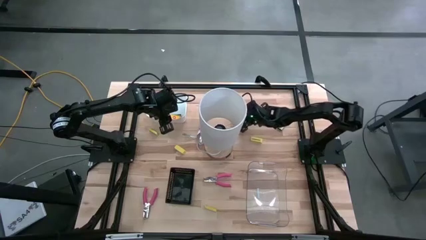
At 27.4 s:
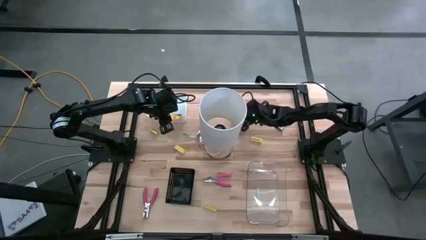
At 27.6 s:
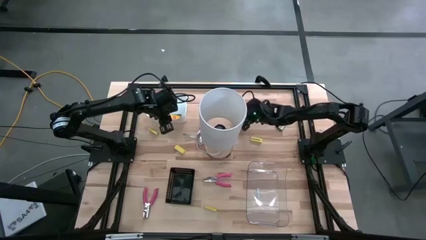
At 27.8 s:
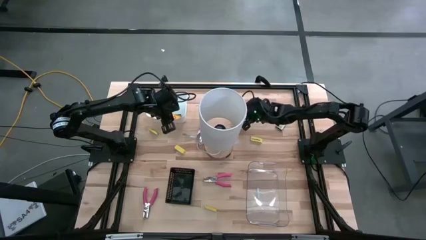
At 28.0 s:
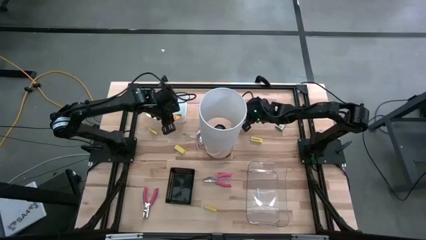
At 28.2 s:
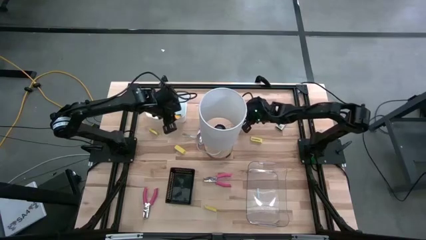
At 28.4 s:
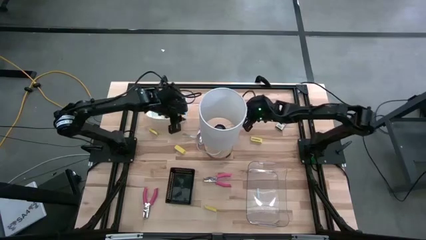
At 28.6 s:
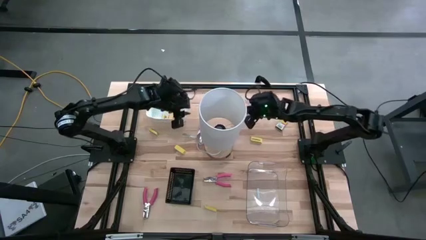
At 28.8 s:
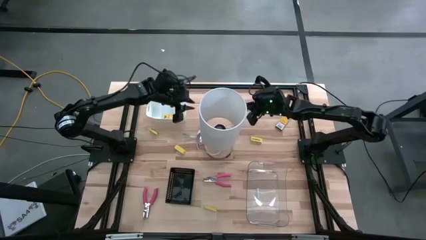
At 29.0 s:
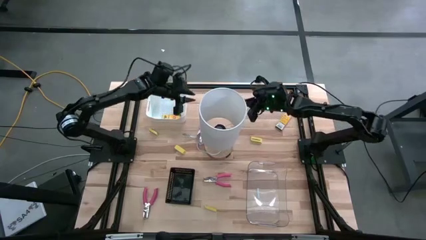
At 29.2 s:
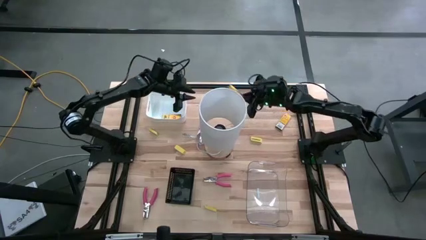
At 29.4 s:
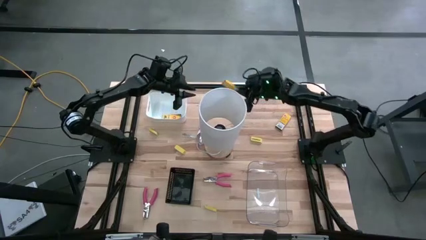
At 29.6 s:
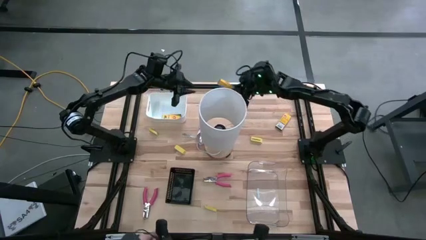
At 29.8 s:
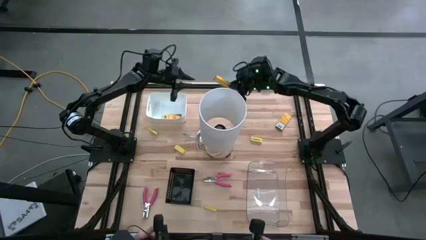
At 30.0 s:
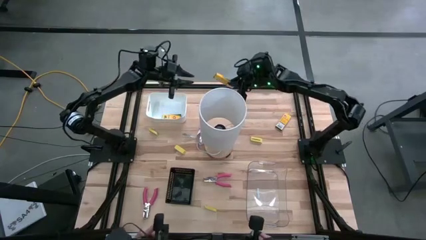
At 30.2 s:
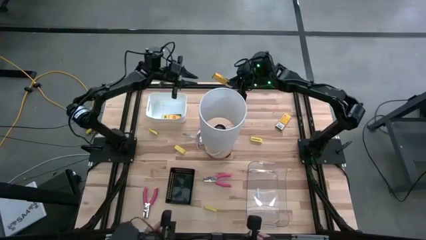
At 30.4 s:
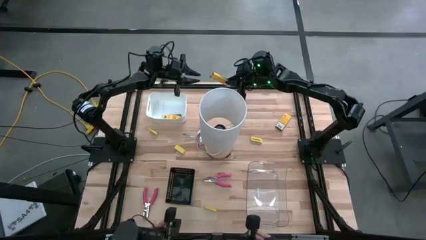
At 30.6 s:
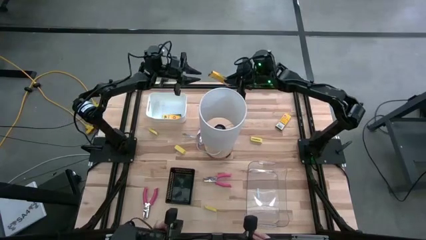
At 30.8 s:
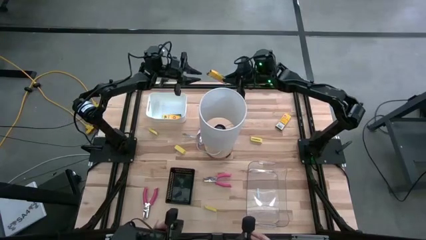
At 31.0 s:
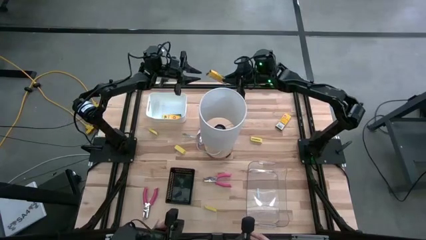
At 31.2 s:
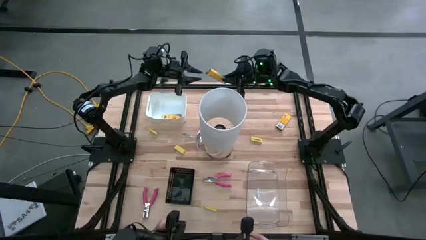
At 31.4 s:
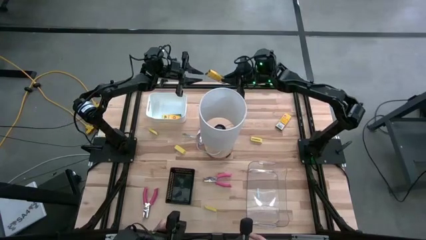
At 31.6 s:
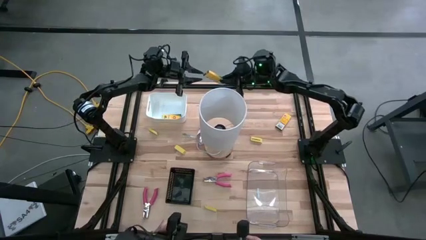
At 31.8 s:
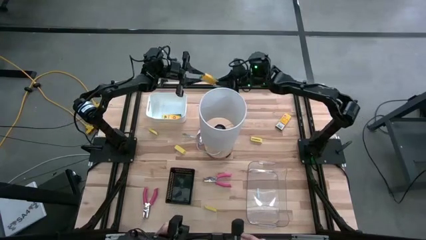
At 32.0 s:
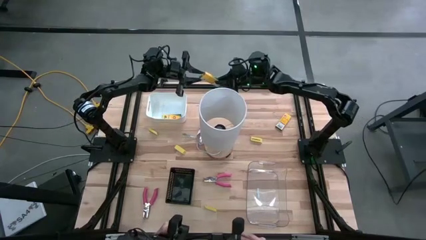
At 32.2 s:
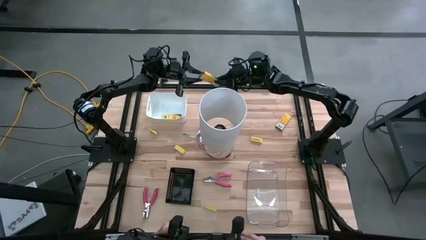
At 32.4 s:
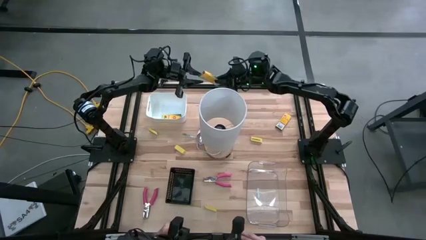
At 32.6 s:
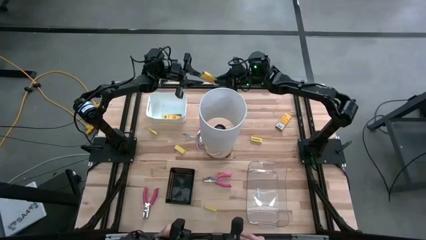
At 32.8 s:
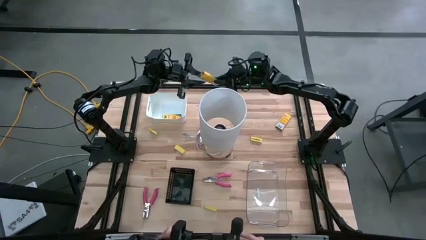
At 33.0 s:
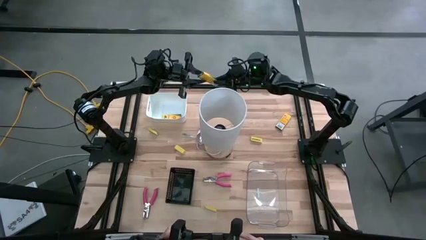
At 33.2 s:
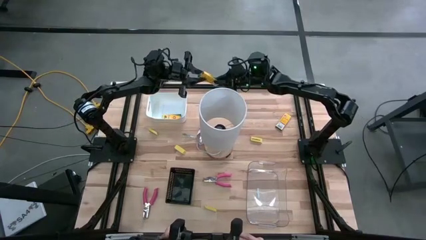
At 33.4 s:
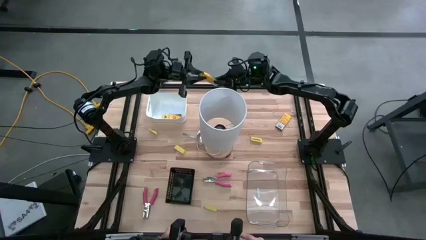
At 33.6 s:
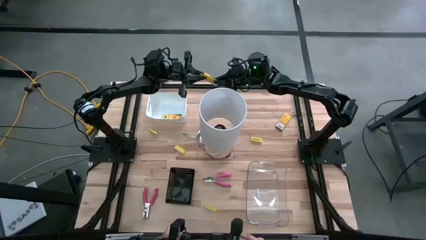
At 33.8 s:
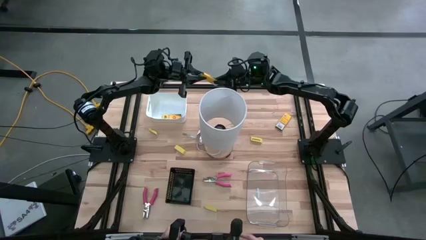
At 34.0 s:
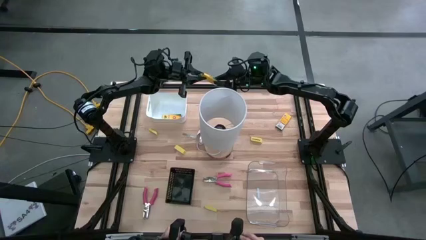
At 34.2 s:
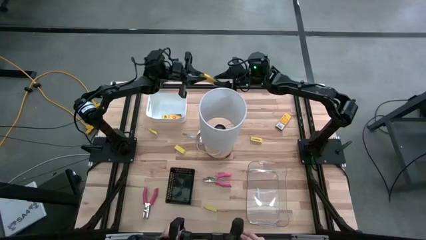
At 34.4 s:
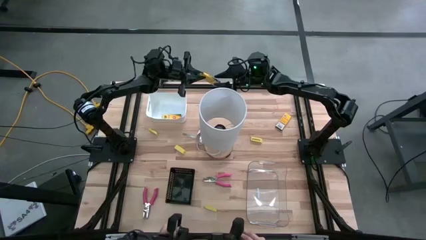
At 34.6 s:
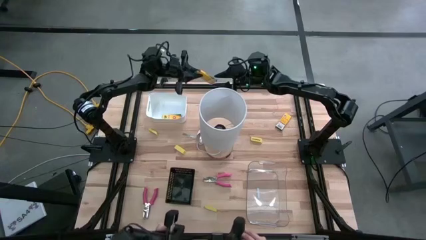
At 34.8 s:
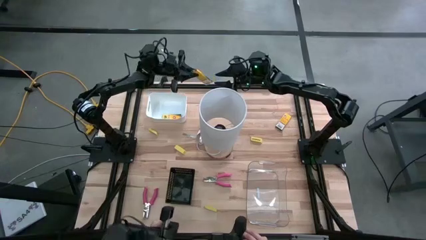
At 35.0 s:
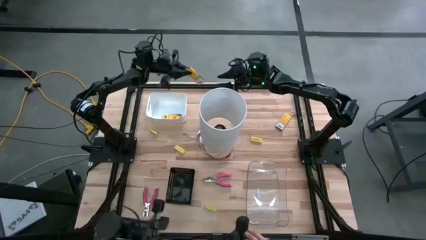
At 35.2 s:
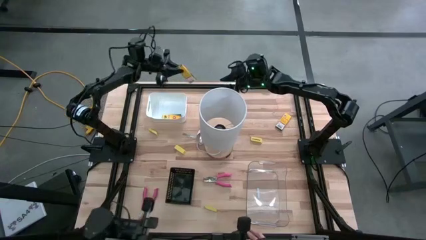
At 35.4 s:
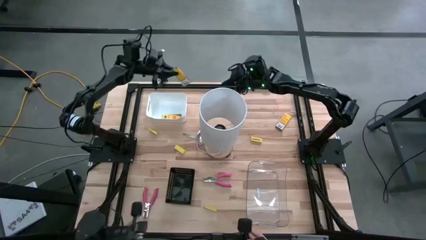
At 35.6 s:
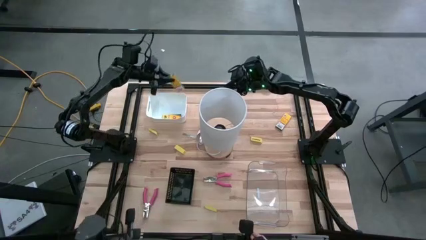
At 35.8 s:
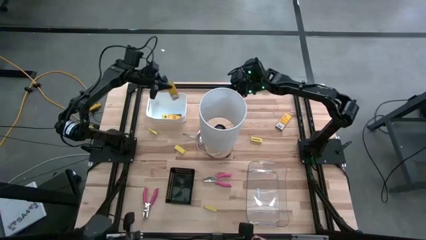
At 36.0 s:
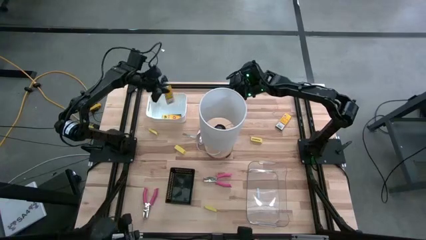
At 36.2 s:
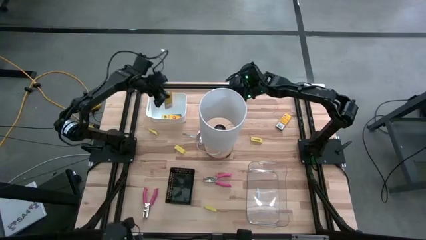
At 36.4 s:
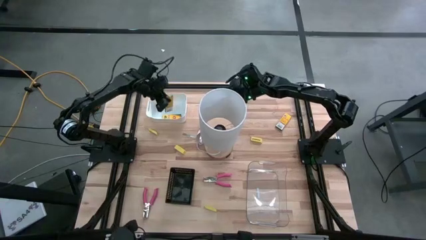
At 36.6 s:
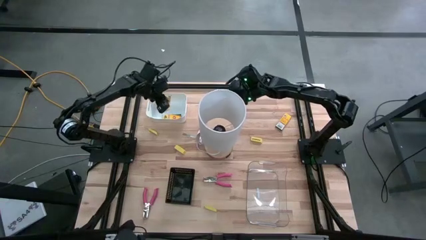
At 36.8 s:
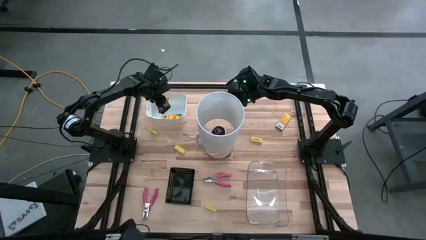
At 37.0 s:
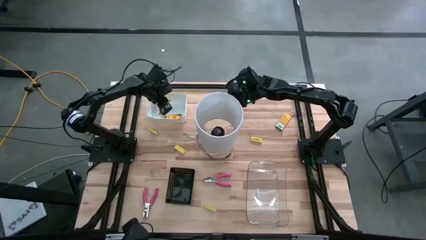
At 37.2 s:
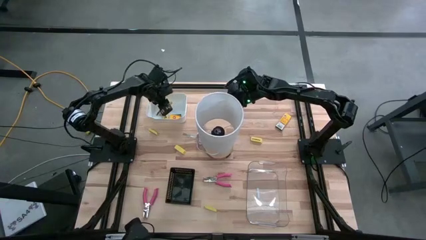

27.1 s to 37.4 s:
Task: Pick & Place School Supplies
Put the crayon box into the white bin

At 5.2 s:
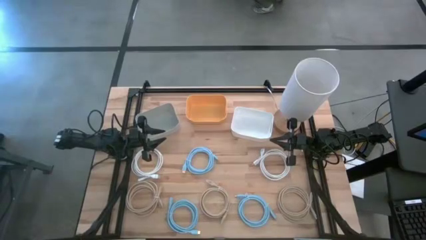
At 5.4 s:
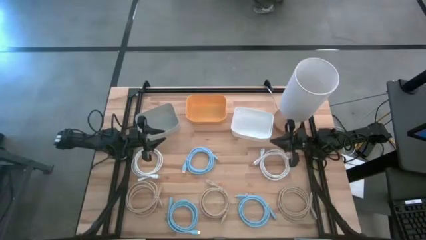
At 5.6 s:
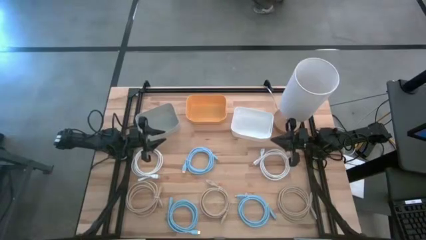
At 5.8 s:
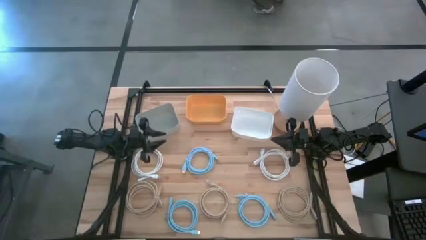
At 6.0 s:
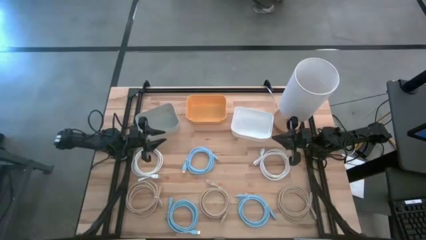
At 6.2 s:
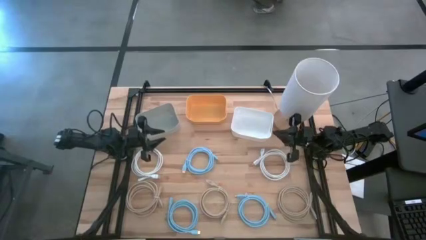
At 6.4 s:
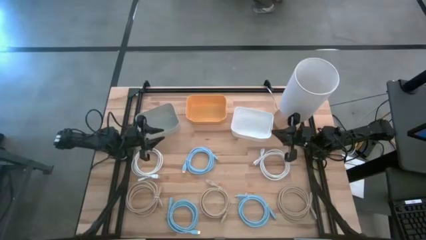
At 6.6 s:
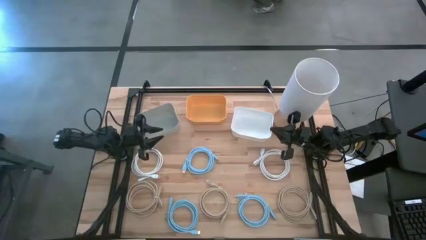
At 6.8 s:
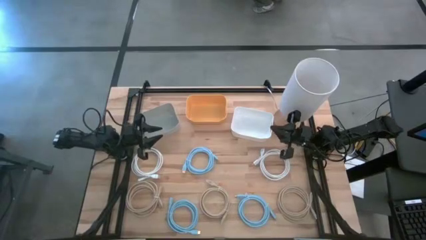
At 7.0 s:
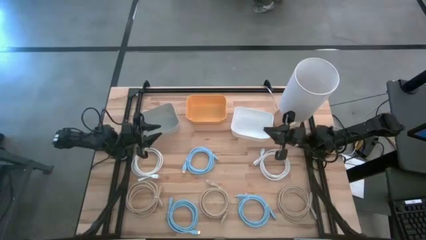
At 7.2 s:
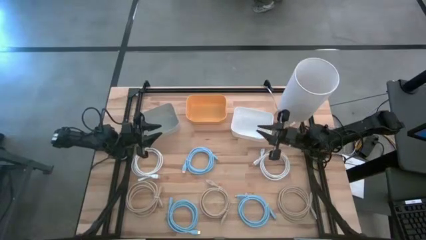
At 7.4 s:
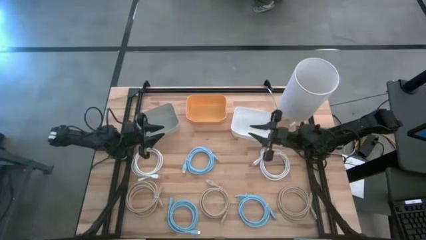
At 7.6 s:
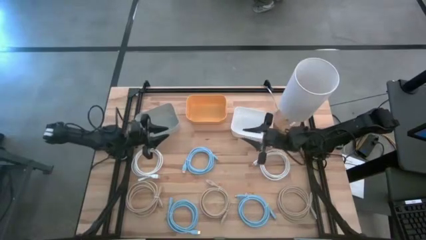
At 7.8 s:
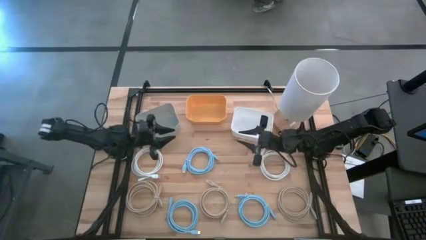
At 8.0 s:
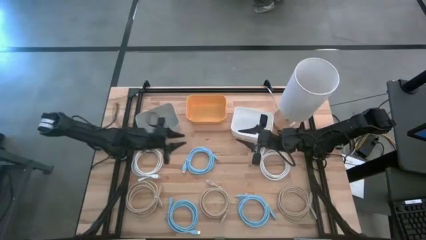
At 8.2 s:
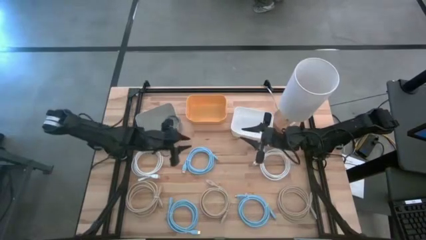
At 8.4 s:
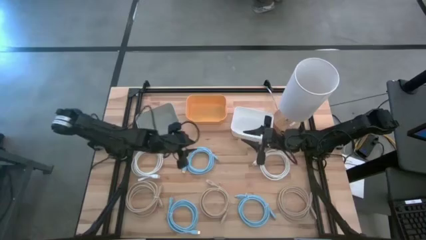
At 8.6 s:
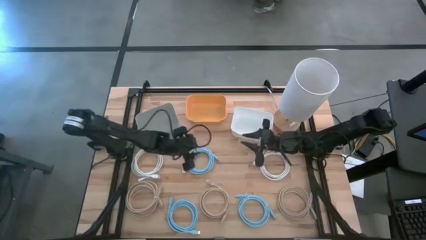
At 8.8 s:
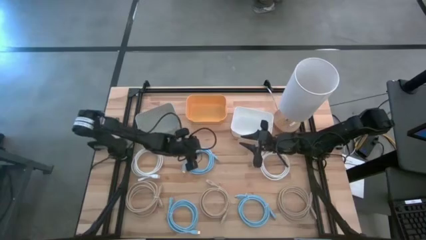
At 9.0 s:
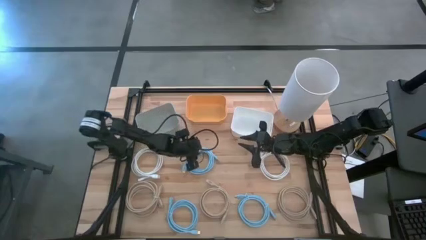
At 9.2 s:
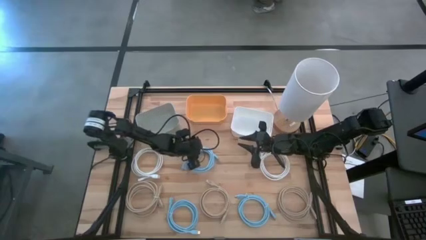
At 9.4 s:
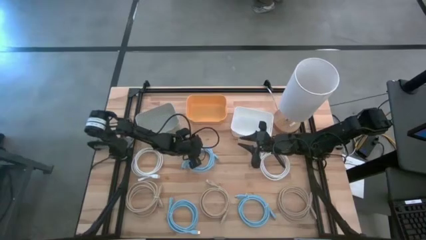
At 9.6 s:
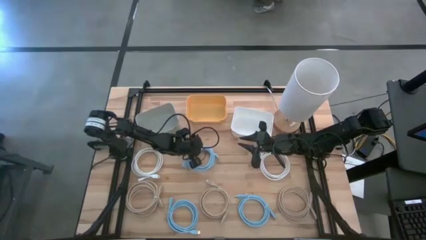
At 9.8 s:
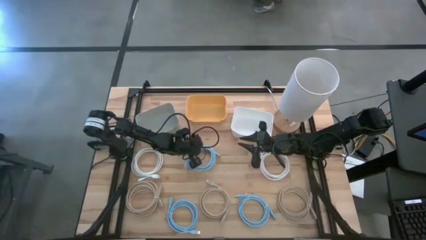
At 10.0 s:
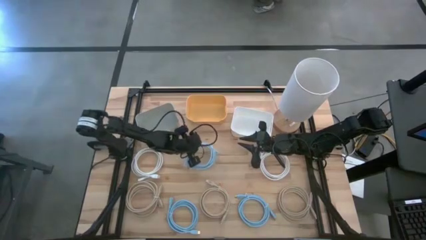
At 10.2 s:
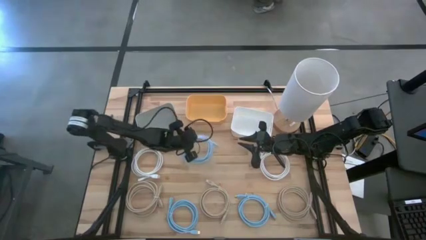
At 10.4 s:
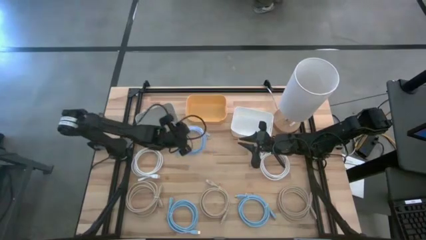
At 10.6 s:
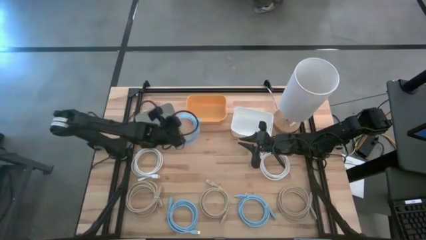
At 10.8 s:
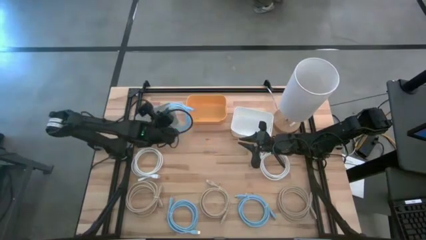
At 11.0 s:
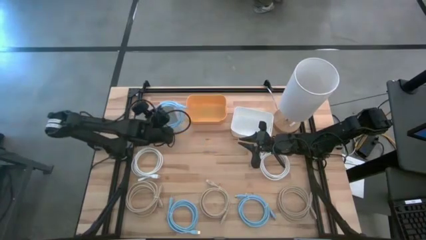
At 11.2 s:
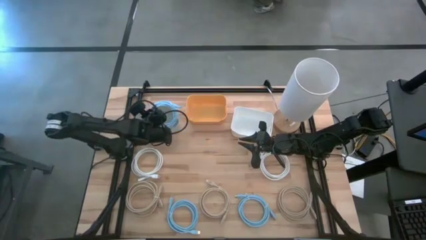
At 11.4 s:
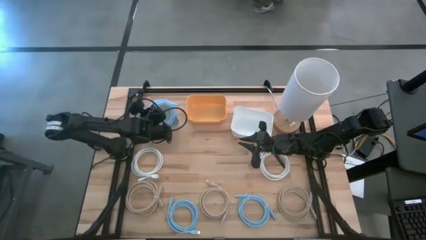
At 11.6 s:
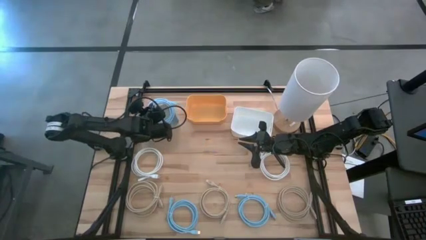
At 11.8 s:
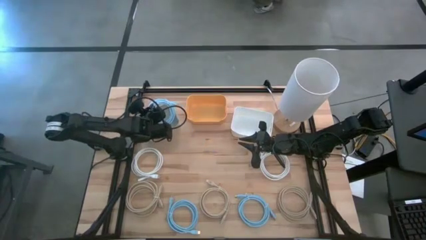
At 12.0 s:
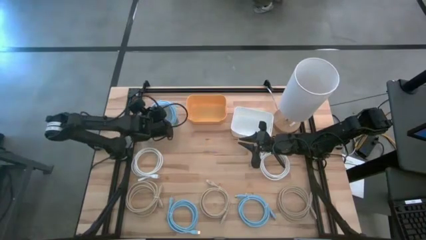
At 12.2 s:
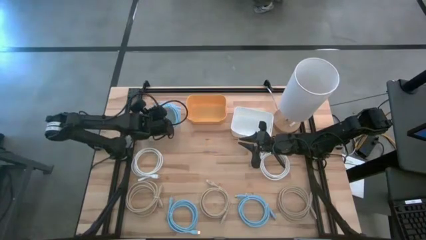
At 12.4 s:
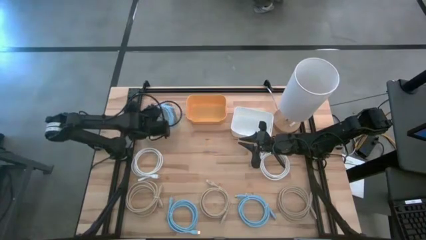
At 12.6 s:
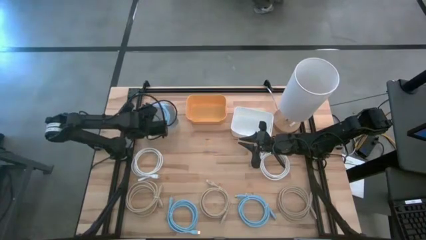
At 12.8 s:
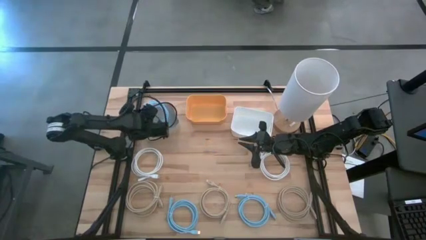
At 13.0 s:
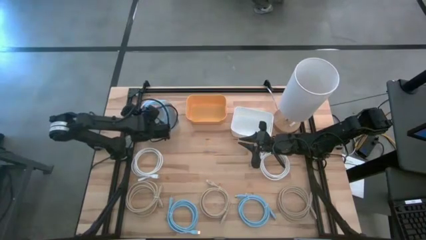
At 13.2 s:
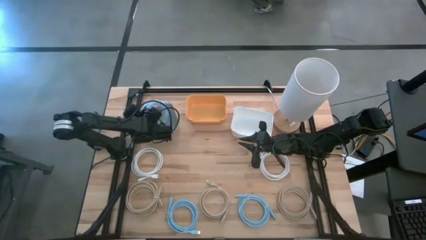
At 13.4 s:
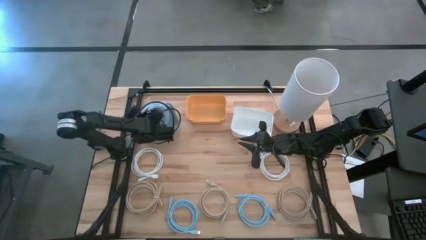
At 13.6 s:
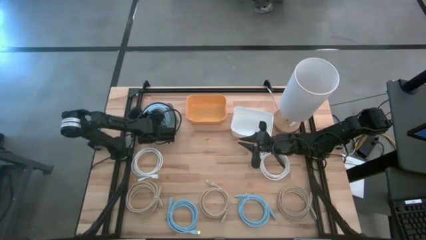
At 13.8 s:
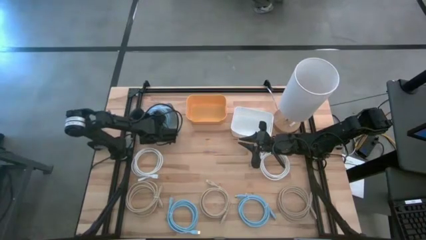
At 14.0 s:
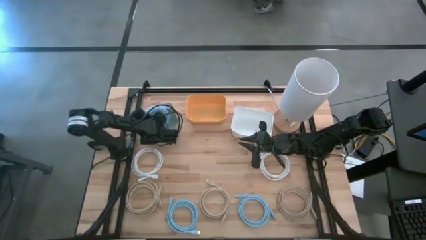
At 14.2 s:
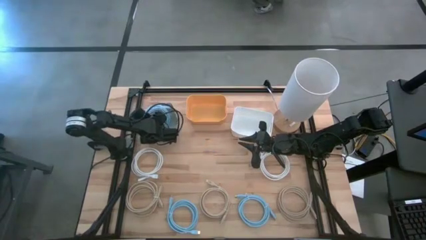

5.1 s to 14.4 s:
Task: Sort HDMI cables
Put the top blue hdmi cable into the gray bin
